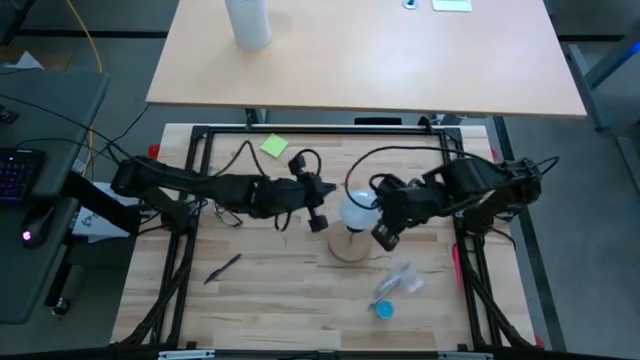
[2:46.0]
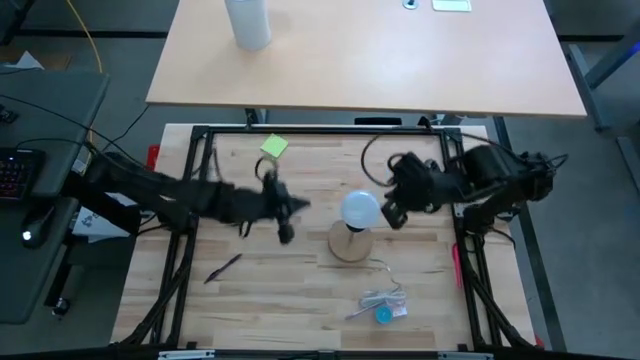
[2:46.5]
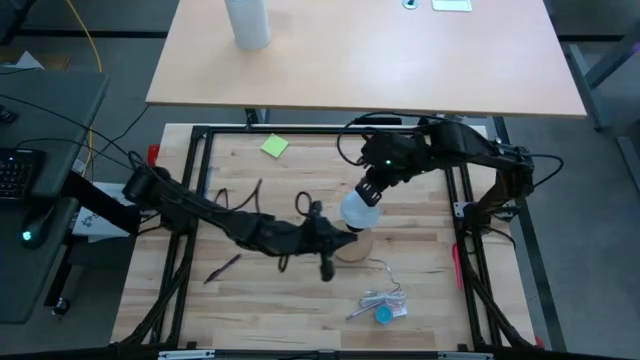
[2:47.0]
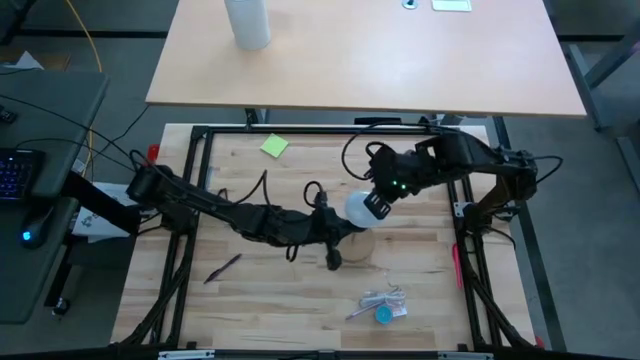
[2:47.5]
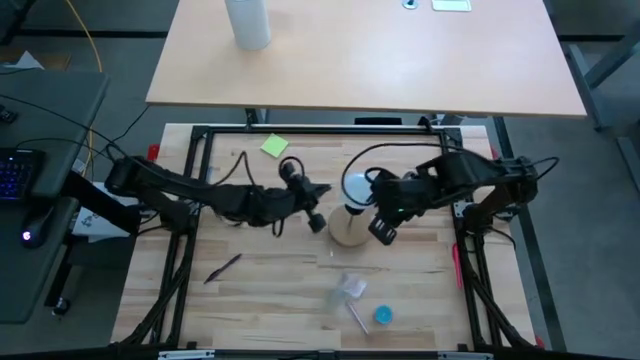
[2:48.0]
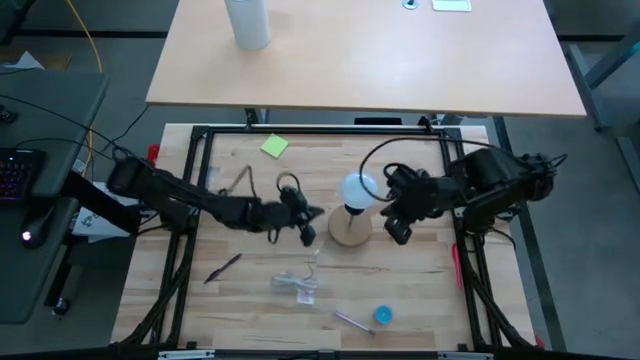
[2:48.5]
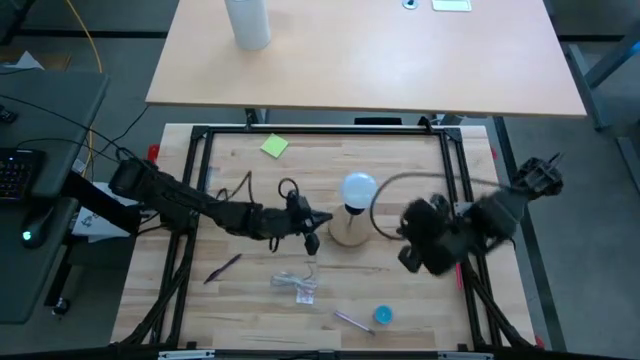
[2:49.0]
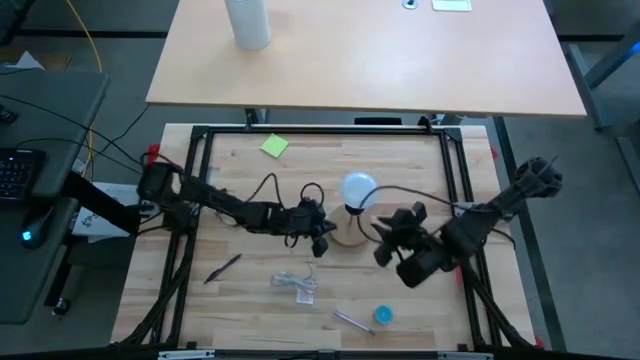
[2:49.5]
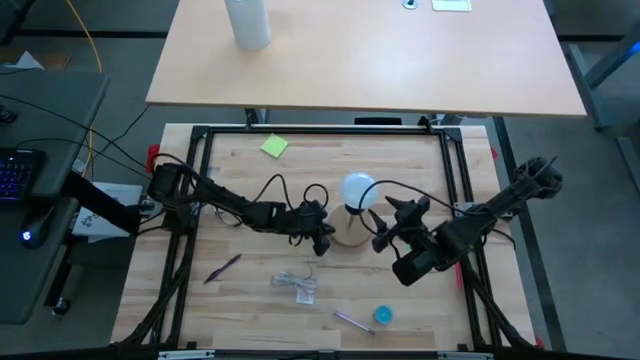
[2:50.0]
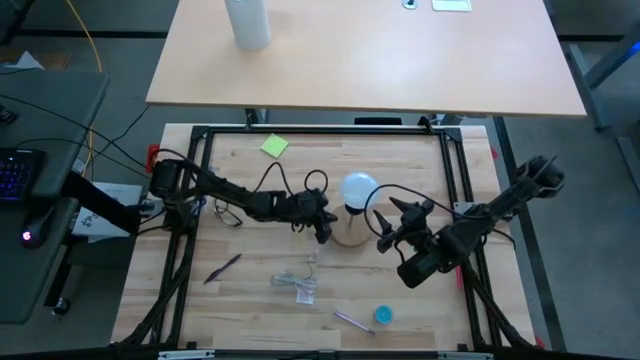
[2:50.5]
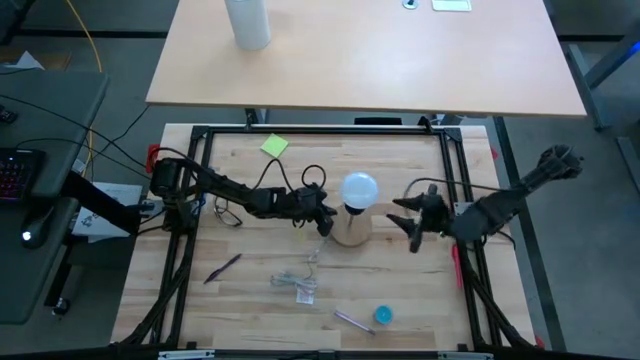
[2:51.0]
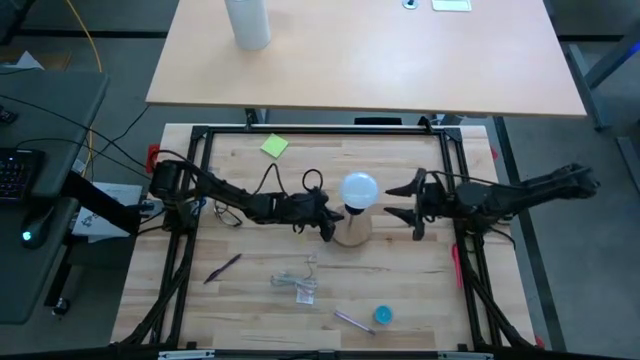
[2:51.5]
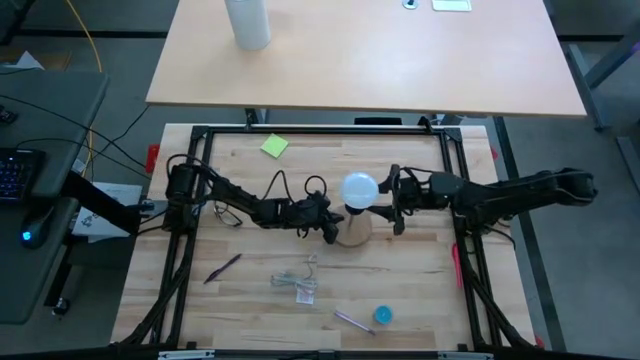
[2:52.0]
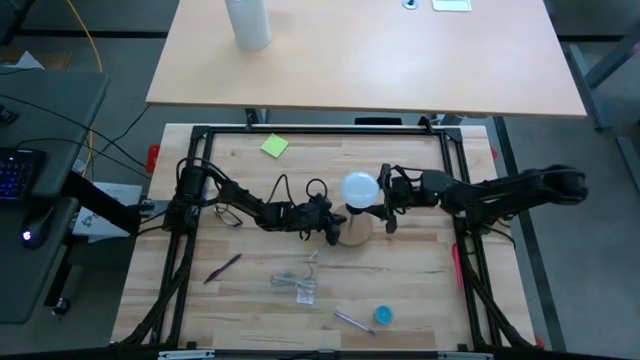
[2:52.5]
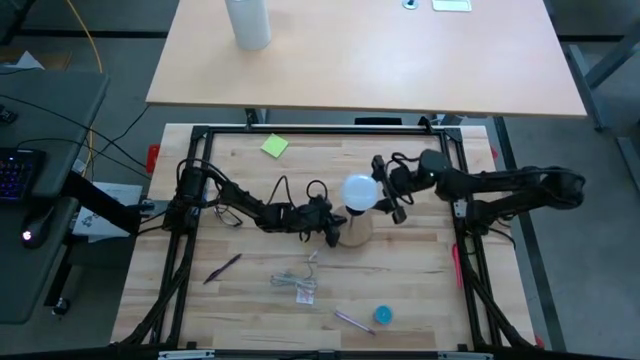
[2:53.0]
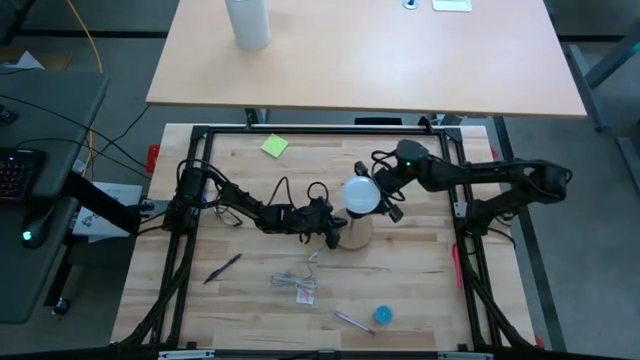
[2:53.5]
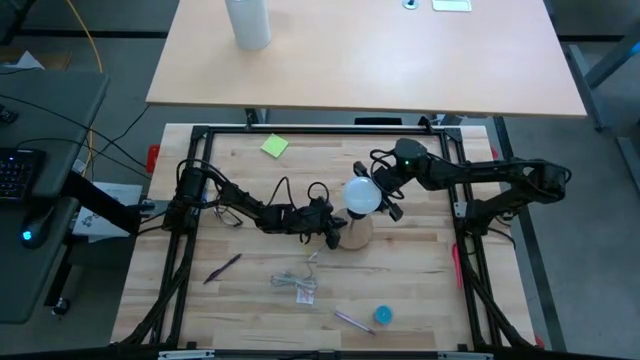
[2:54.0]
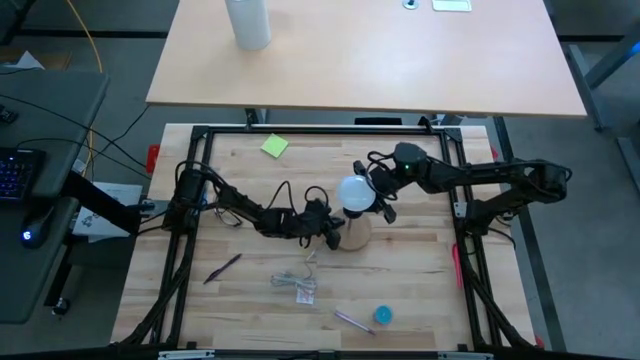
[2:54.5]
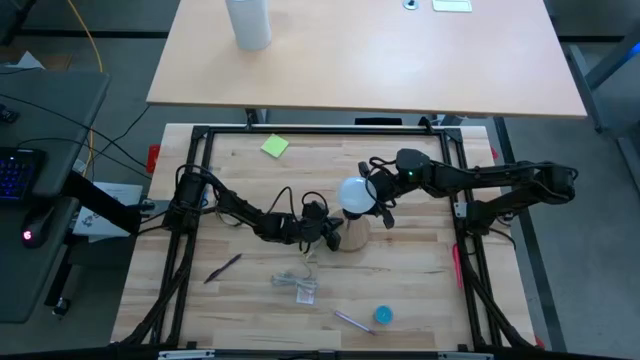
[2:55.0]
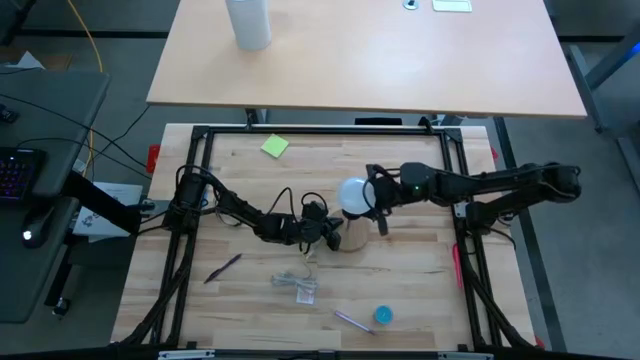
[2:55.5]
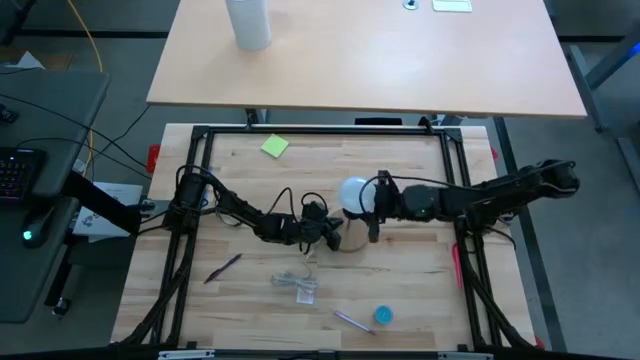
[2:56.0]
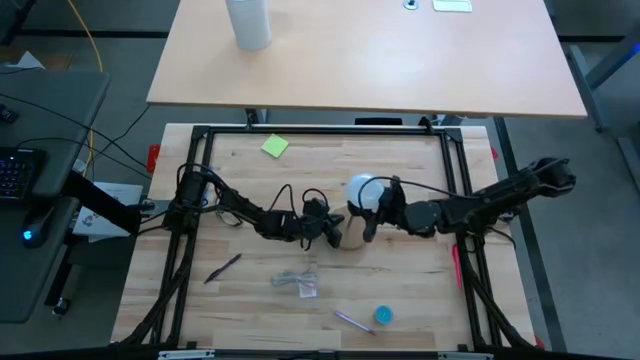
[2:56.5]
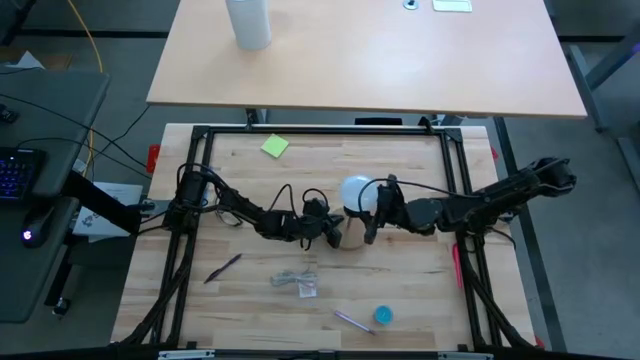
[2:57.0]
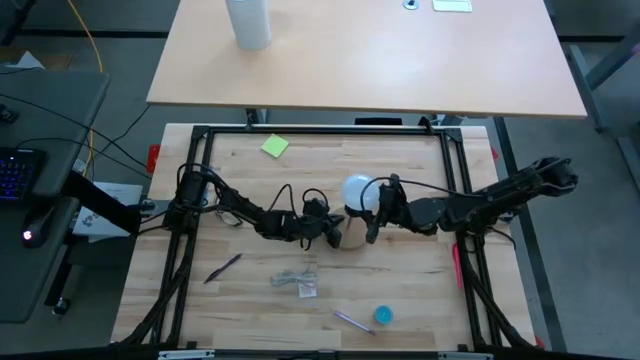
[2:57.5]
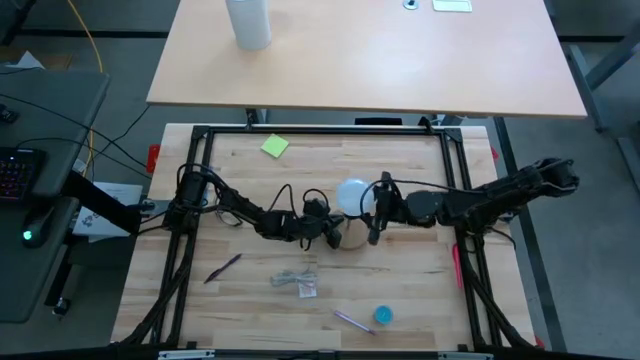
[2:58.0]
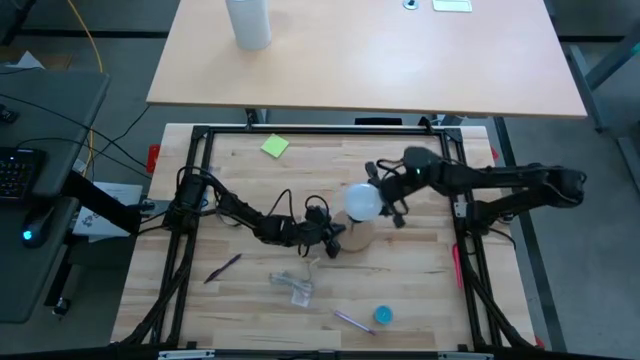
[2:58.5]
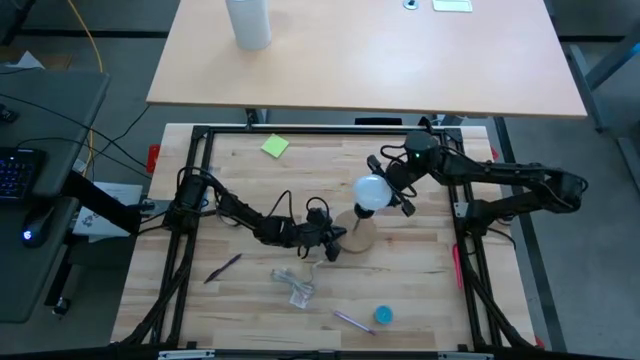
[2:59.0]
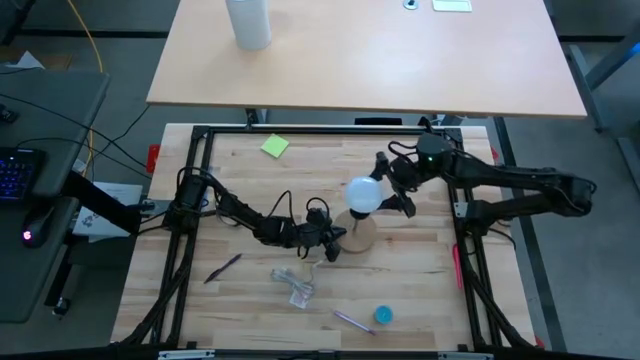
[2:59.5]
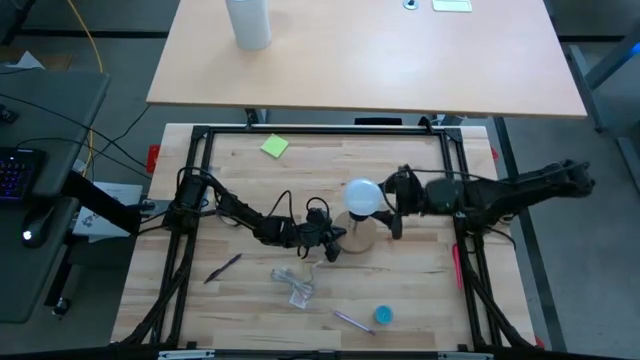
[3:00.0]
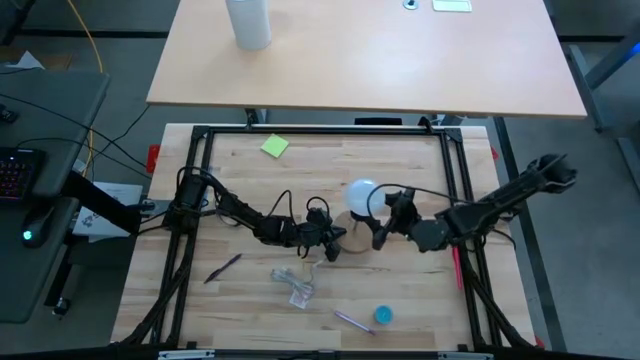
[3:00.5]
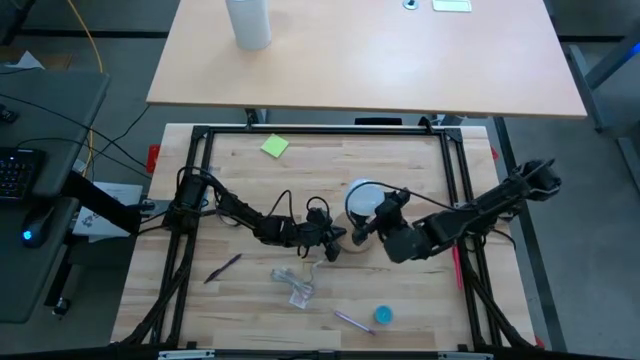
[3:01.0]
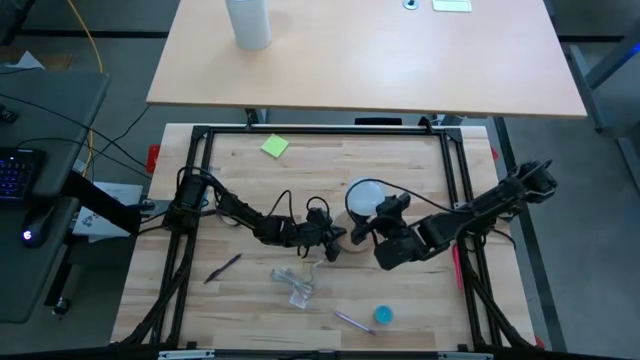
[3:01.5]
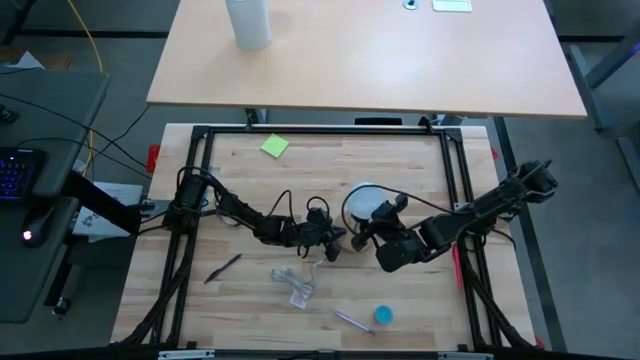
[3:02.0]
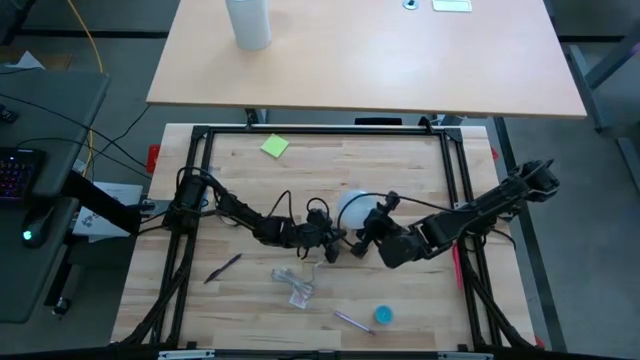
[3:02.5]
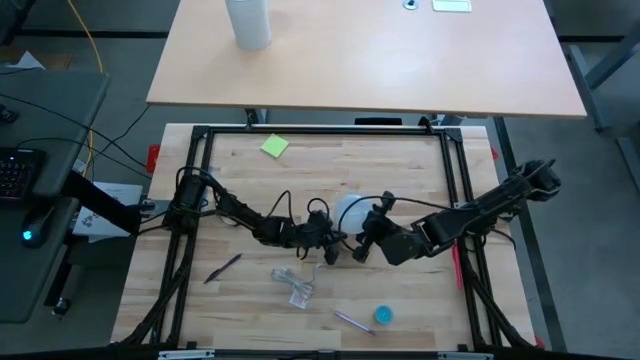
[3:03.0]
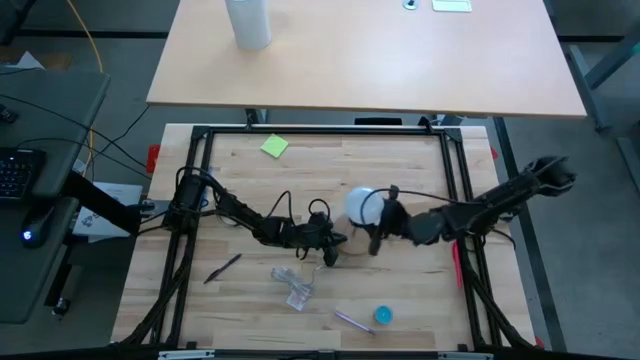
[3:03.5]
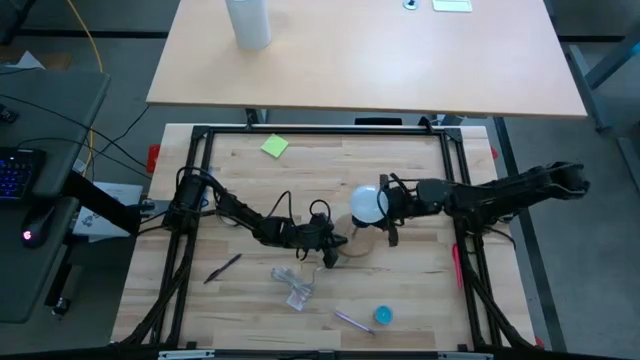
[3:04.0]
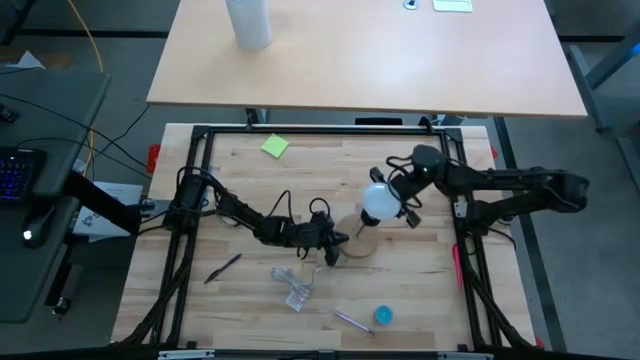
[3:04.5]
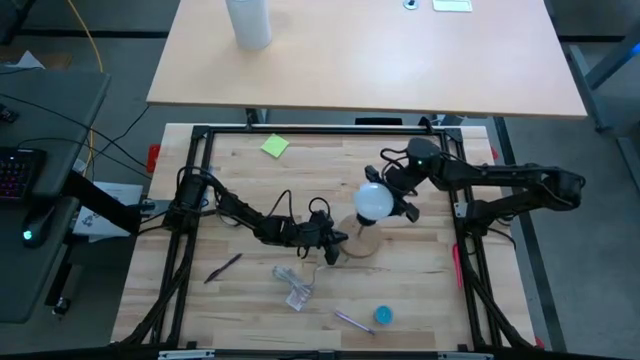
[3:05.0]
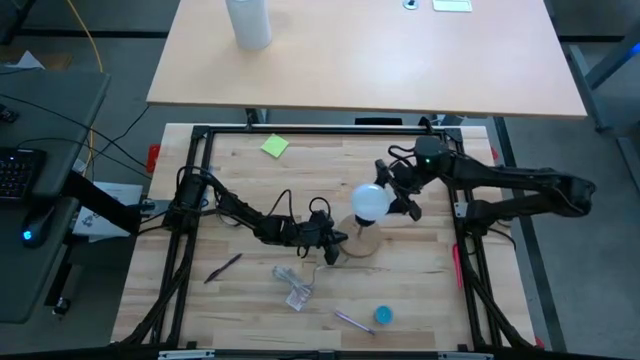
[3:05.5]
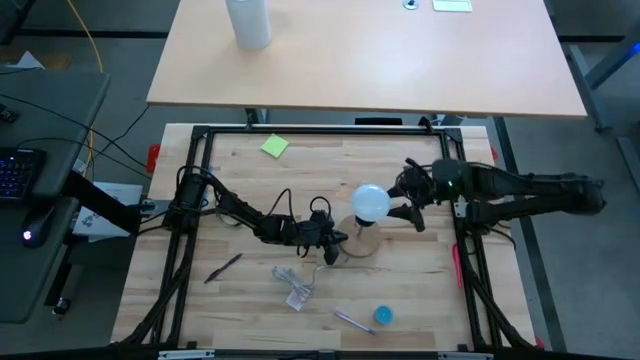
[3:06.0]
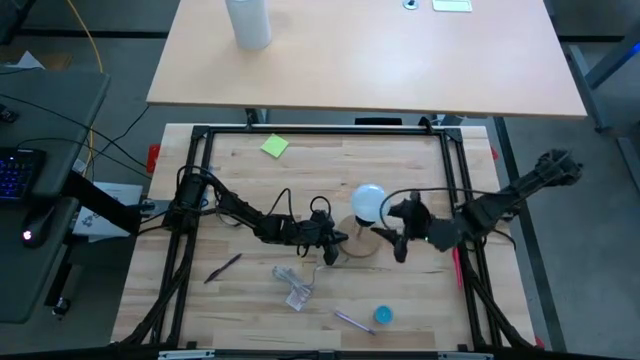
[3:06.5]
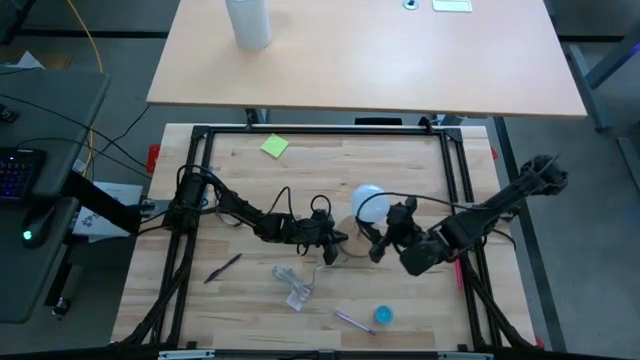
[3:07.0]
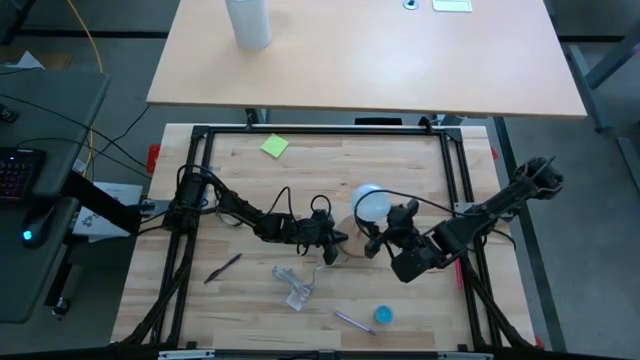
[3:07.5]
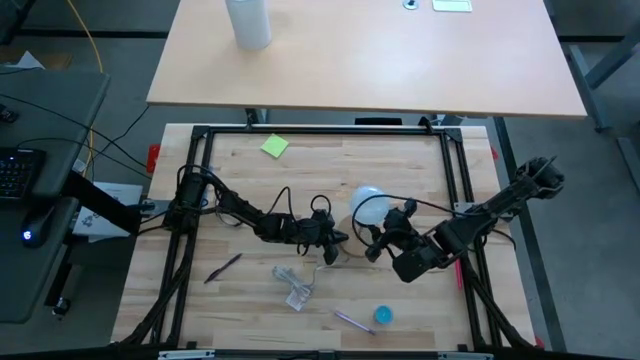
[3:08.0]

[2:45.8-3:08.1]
Task: Screw lightbulb
Remove the lightbulb from the lamp
